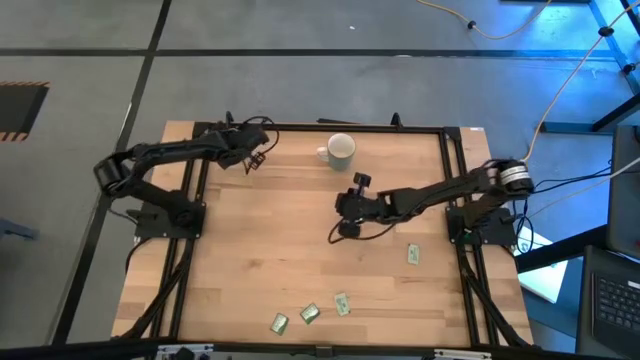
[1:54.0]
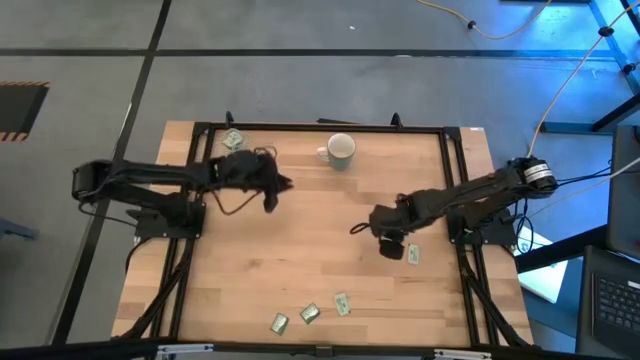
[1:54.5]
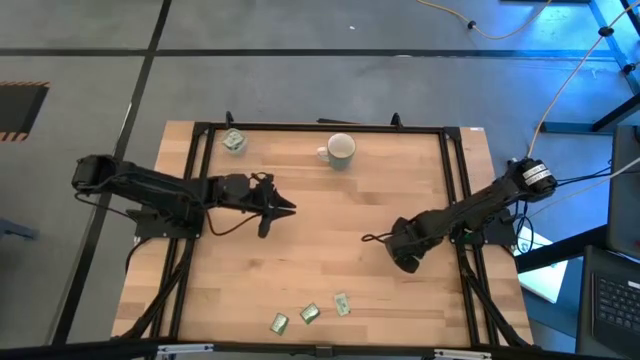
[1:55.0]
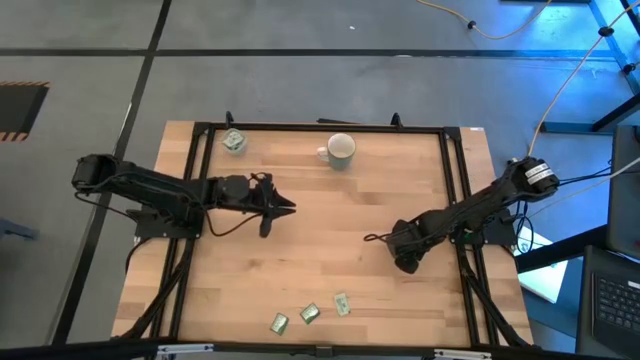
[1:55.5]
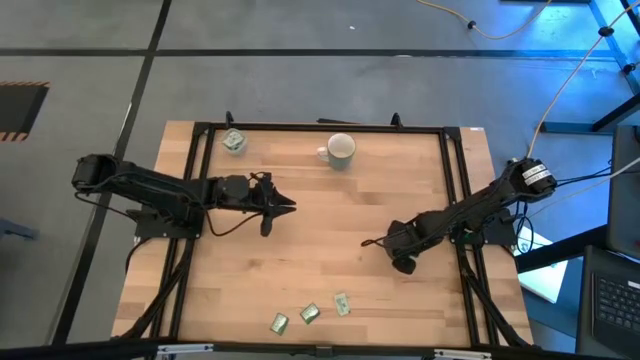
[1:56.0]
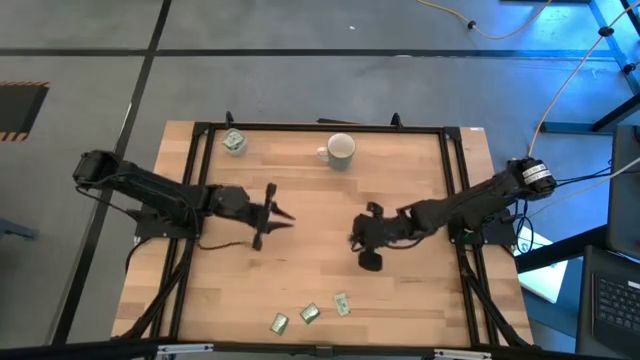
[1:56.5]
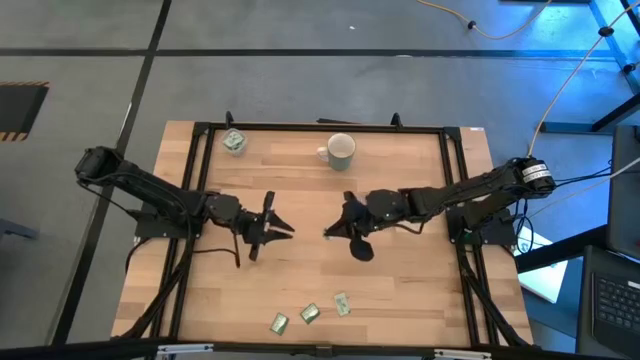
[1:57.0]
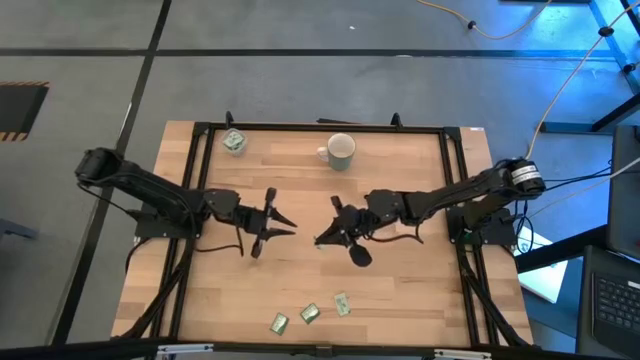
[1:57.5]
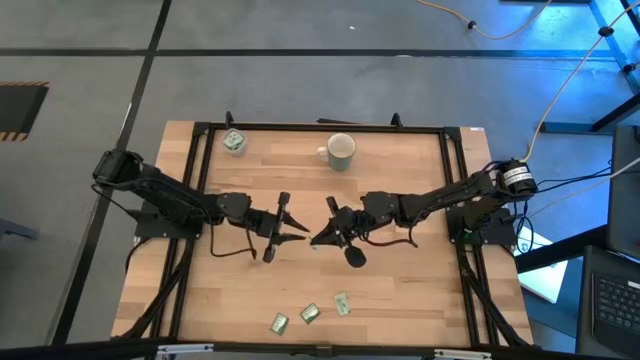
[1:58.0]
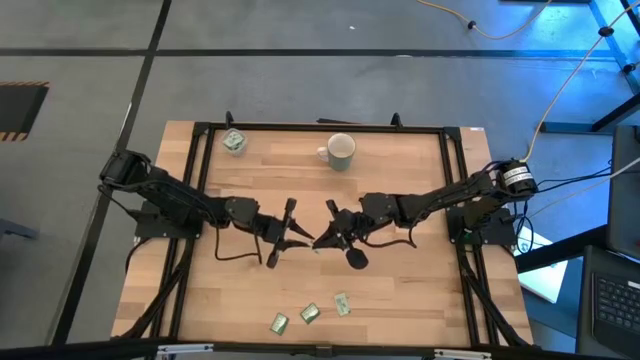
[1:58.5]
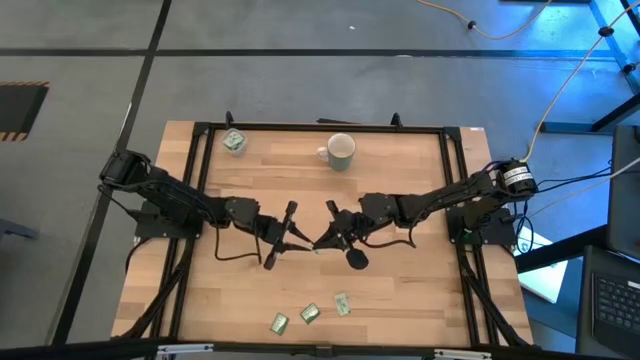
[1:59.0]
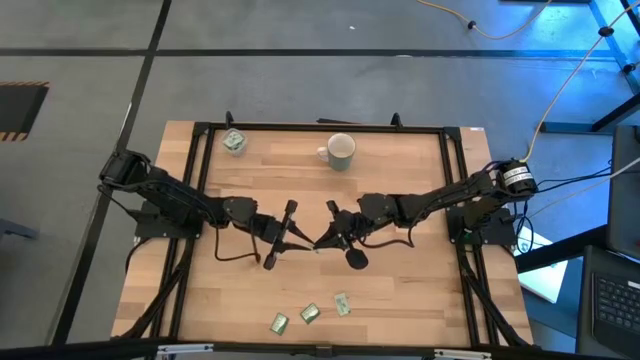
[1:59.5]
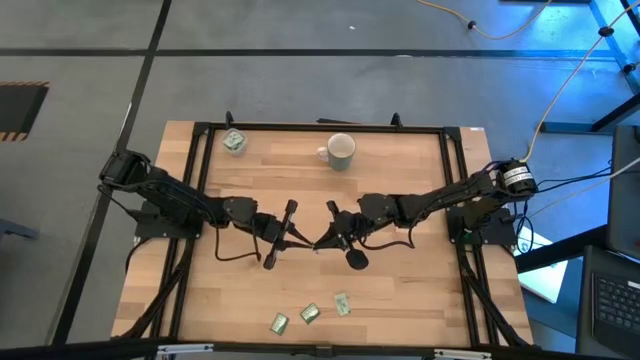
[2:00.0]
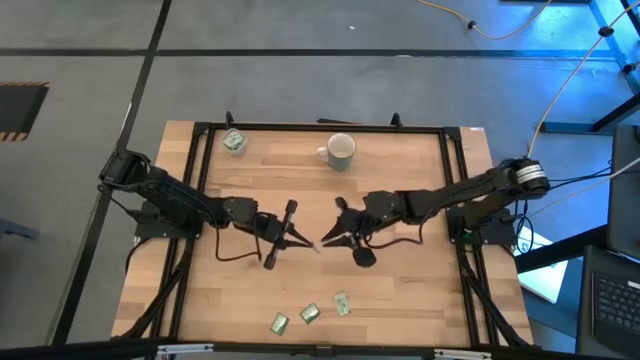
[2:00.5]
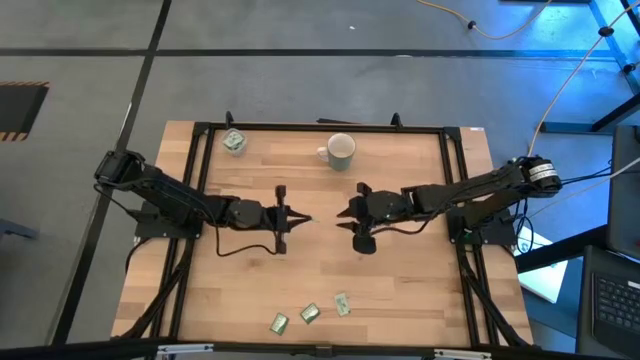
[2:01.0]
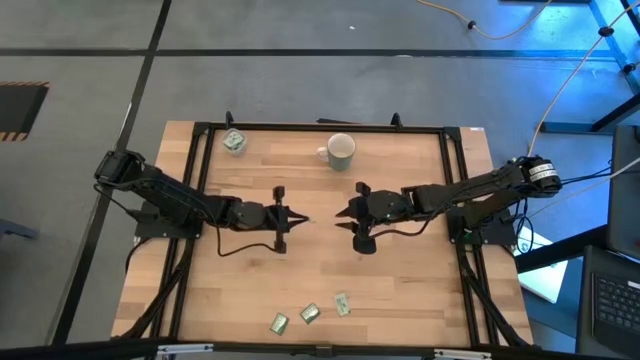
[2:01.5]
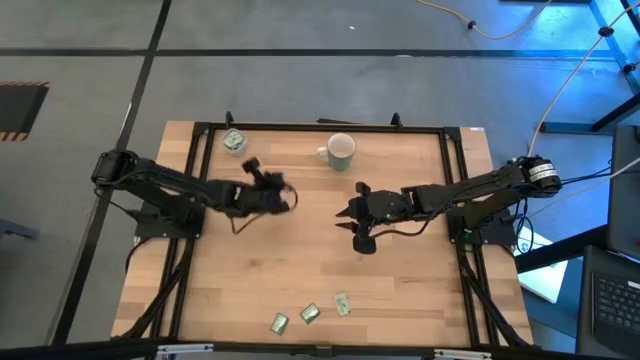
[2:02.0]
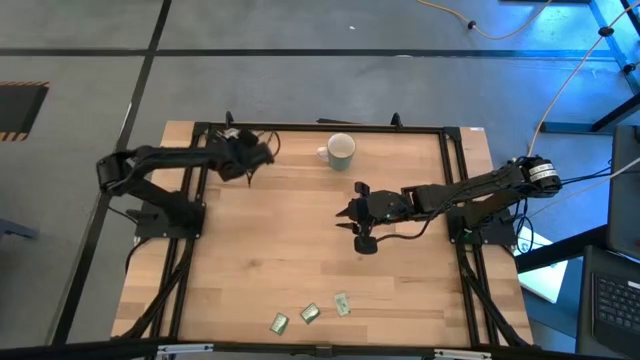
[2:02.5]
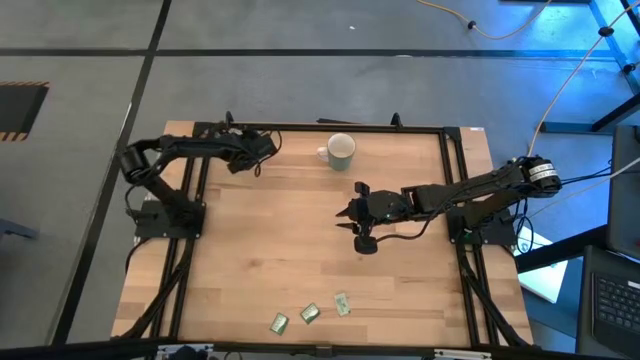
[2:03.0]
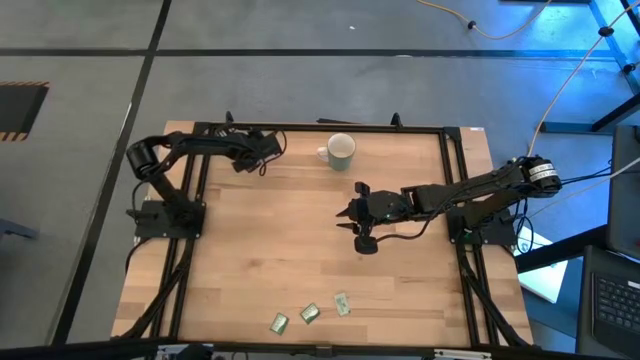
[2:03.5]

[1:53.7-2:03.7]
Task: Pick and place Stevia / Truvia into bins
Put the stevia packet into the transparent bin

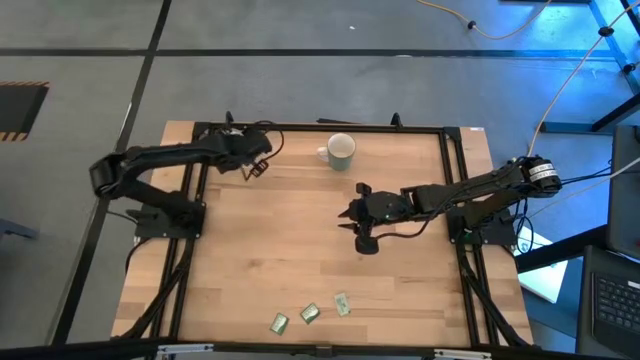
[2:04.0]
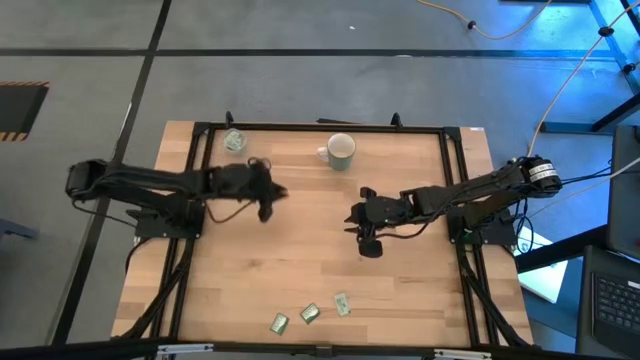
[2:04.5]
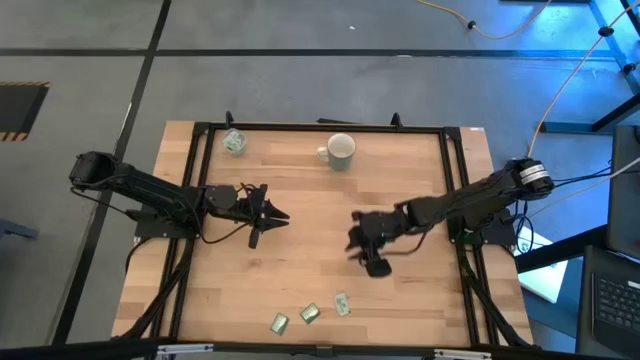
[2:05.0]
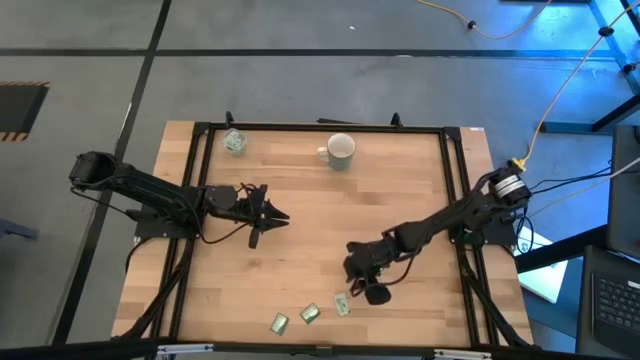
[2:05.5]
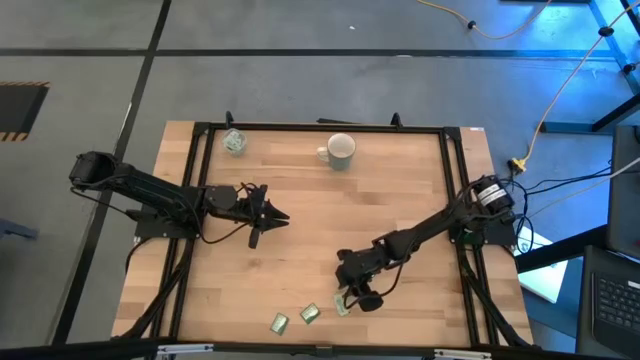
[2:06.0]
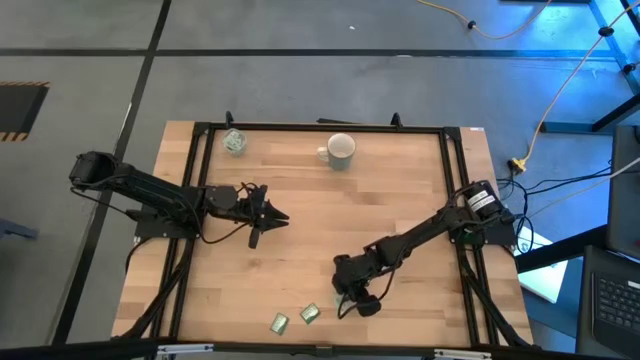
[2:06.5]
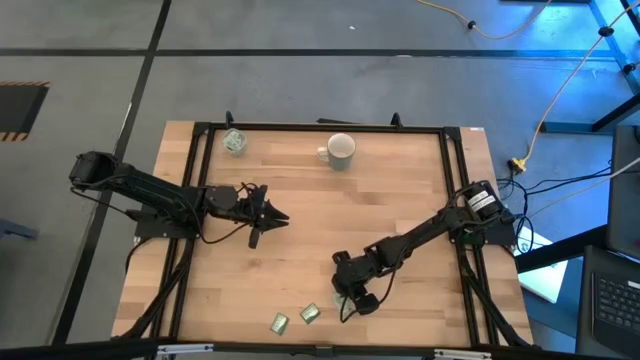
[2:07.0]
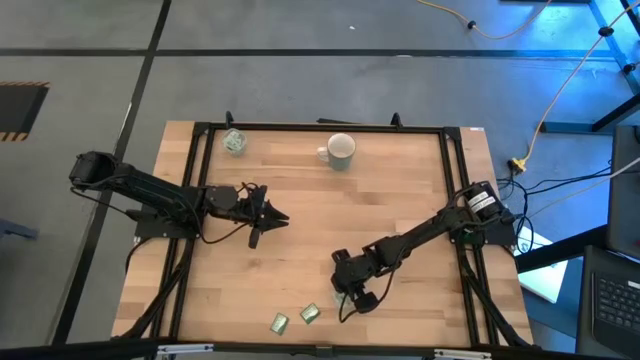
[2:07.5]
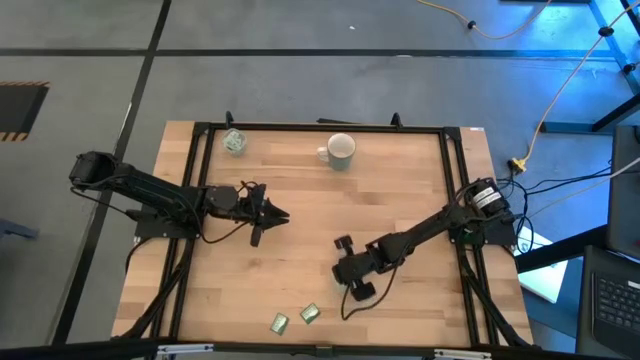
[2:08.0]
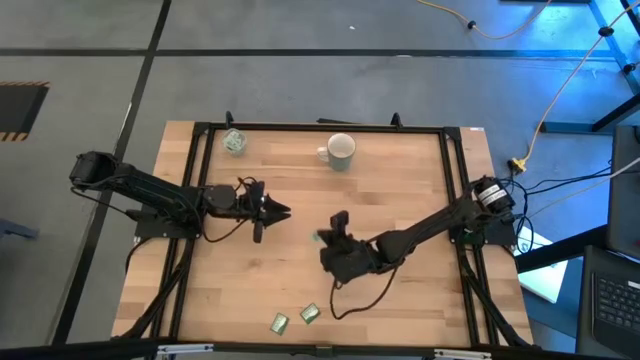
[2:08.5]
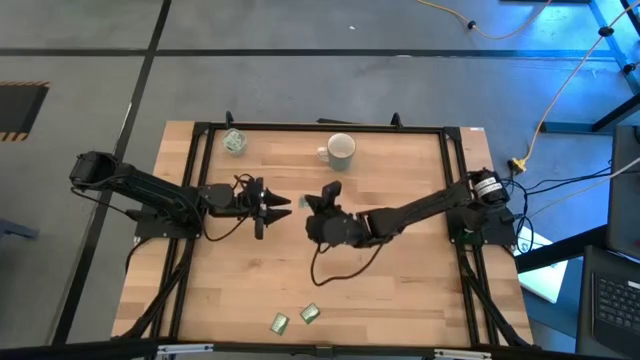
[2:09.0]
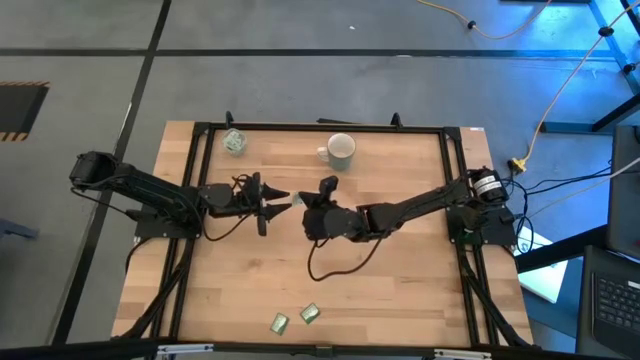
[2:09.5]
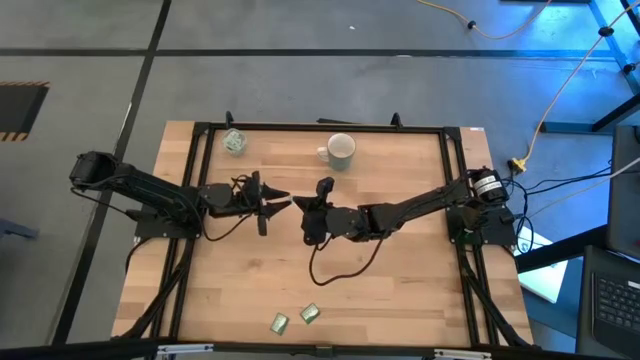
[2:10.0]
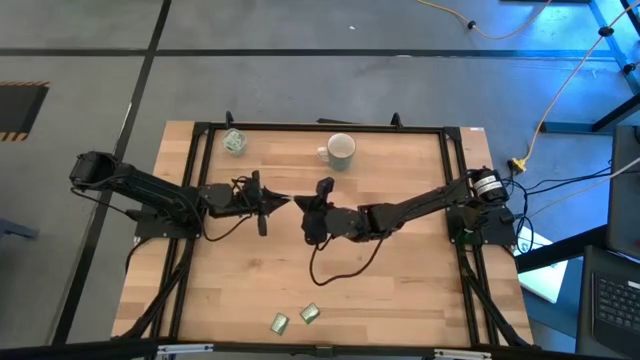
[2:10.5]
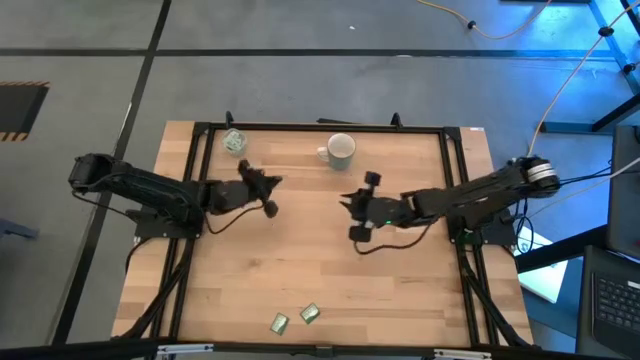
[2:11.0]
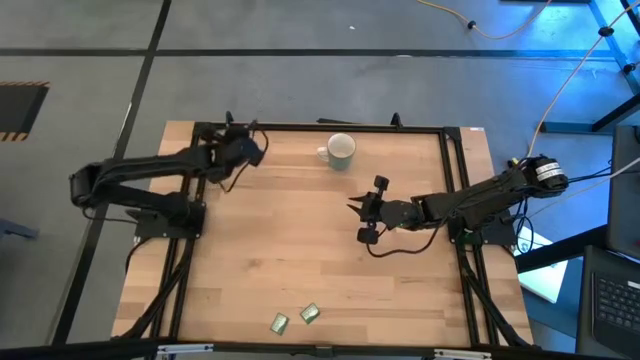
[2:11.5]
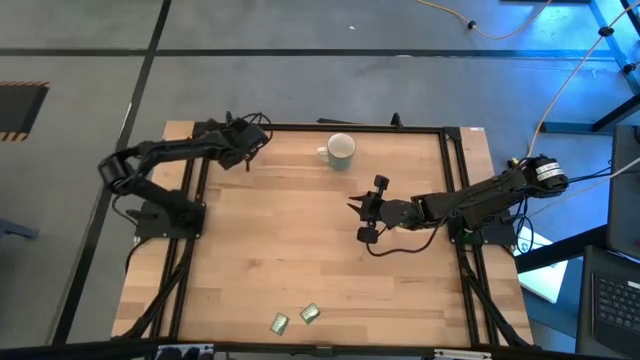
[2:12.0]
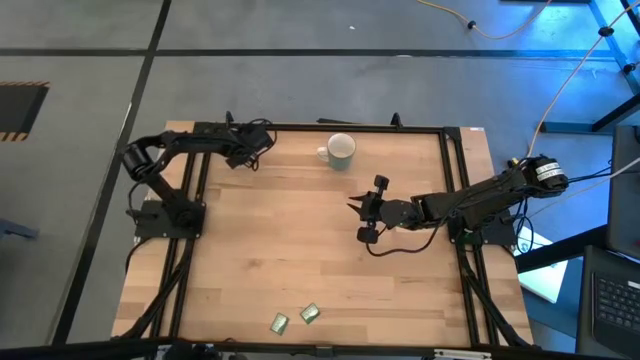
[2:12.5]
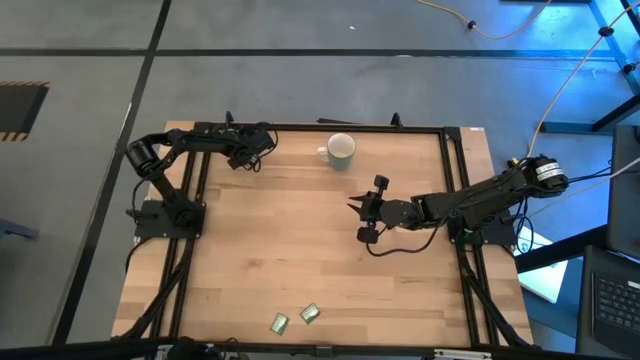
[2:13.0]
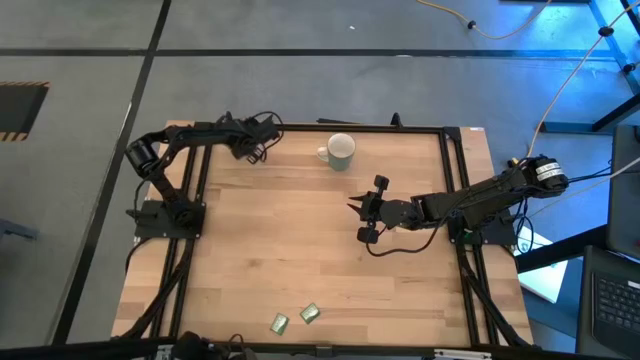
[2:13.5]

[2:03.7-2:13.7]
Put the stevia packet into the transparent bin

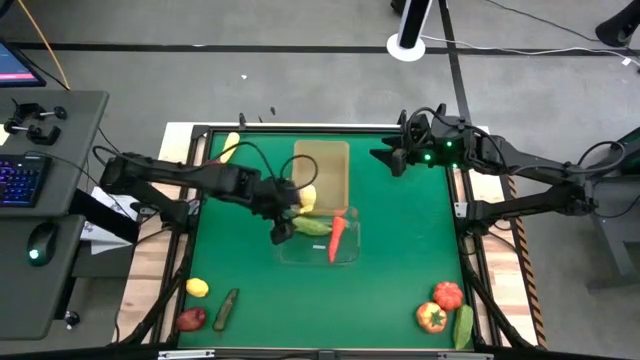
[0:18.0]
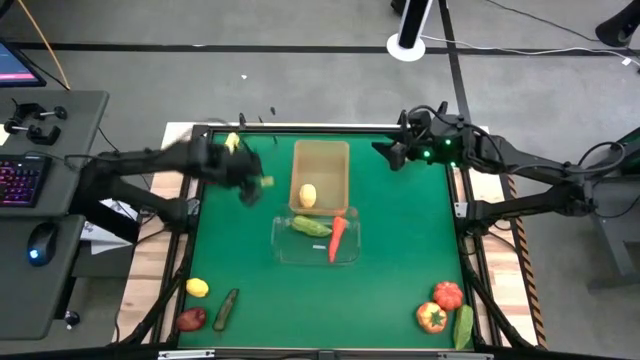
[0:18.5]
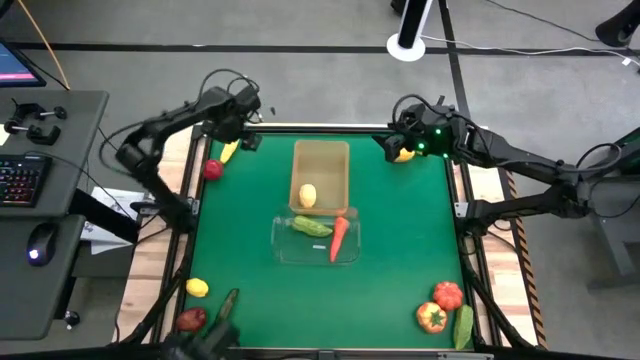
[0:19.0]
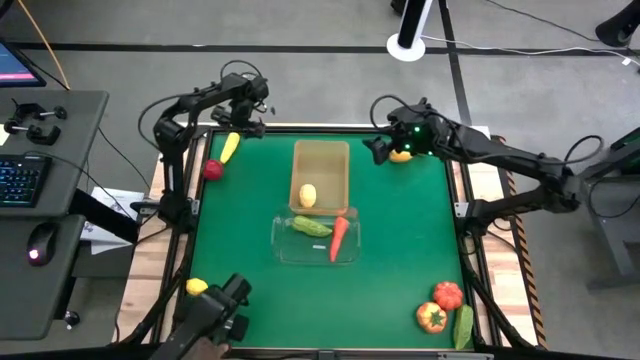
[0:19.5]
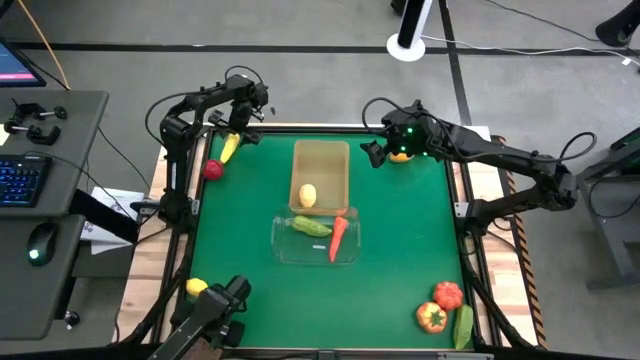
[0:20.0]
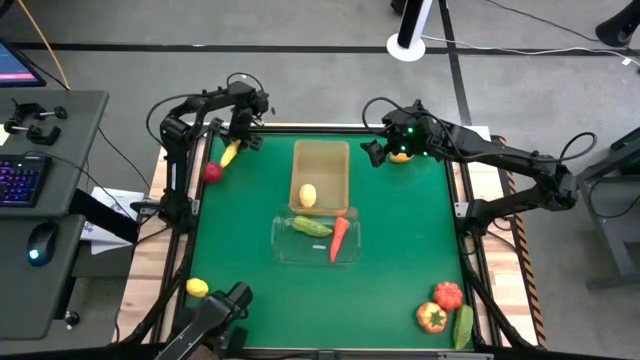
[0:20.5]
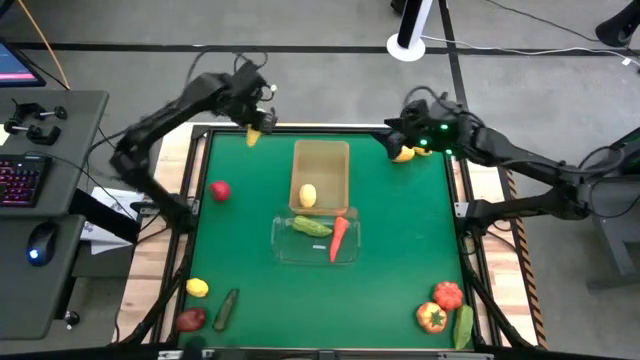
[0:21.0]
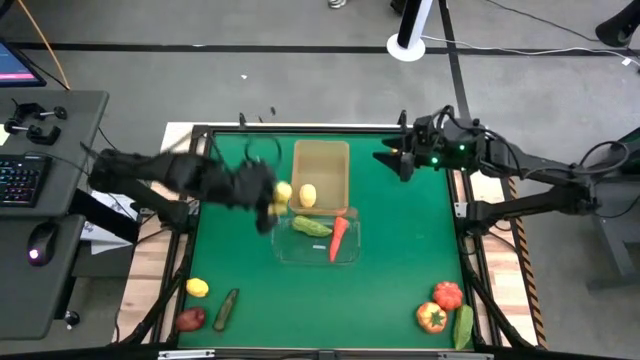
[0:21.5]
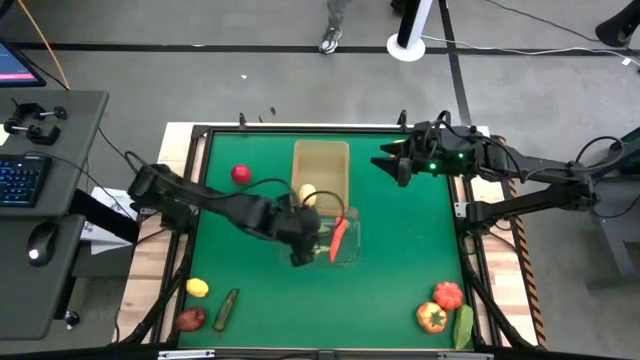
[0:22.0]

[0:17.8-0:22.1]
Task: Sort produce into baskets
Put the yellow corn into the transparent bin
